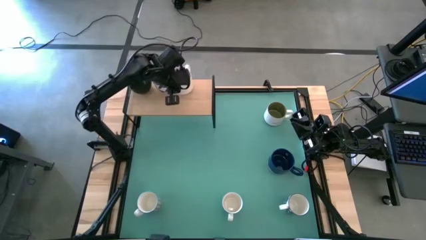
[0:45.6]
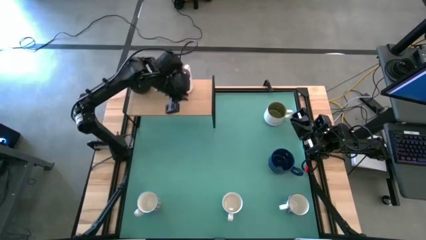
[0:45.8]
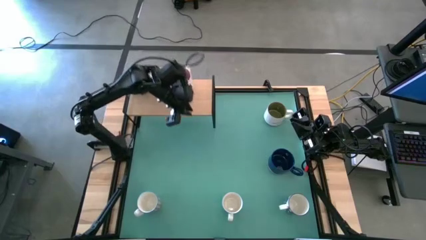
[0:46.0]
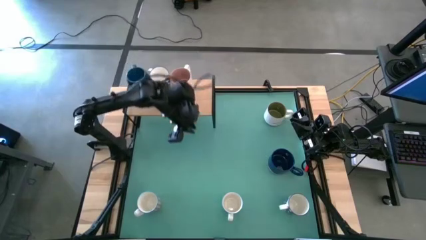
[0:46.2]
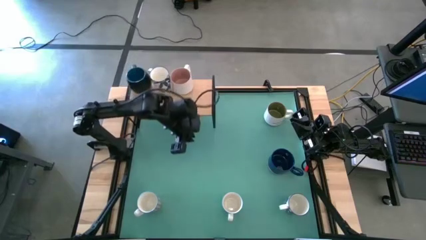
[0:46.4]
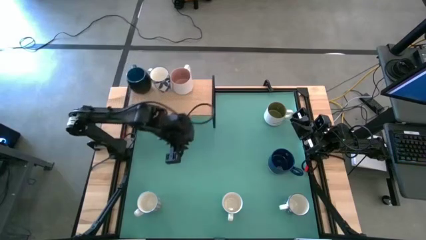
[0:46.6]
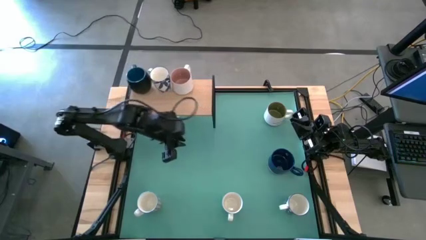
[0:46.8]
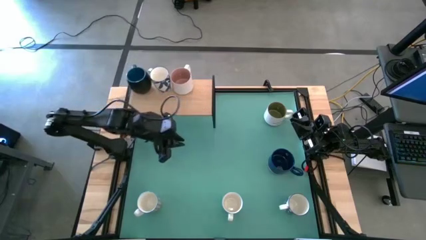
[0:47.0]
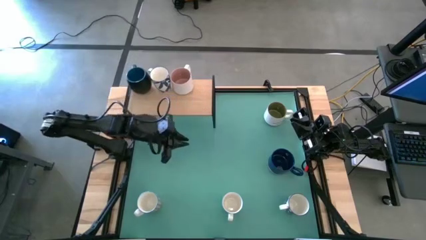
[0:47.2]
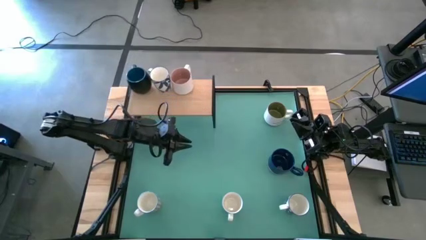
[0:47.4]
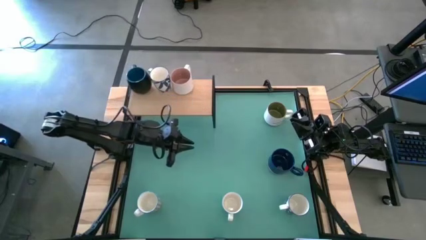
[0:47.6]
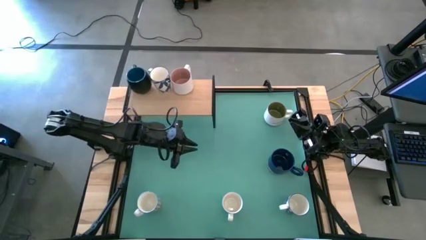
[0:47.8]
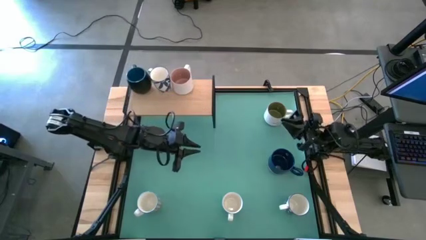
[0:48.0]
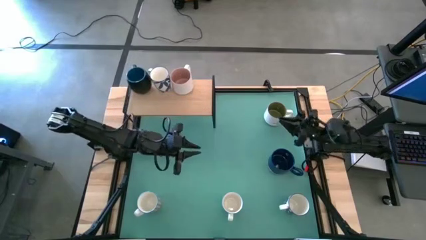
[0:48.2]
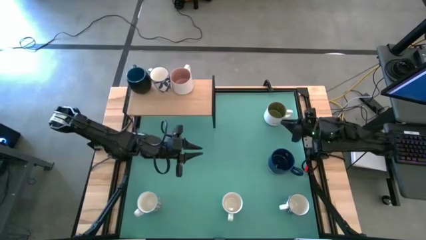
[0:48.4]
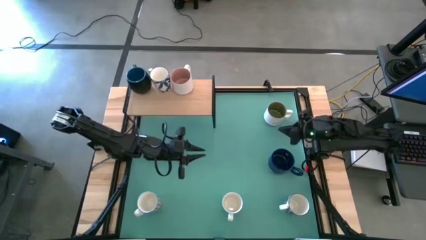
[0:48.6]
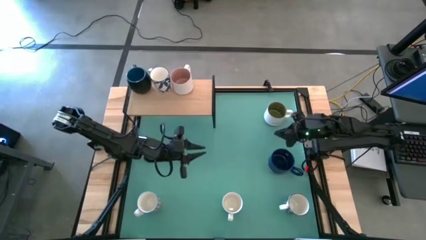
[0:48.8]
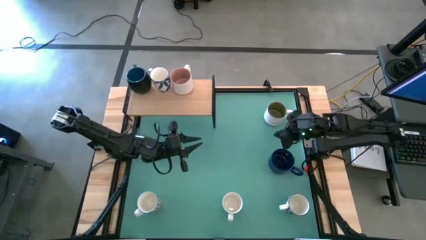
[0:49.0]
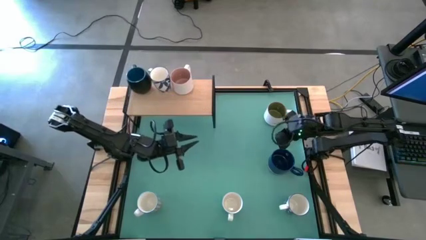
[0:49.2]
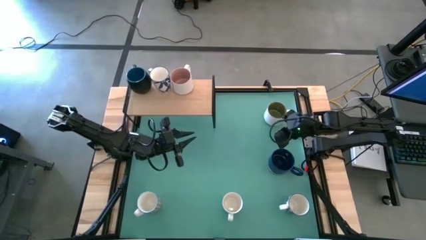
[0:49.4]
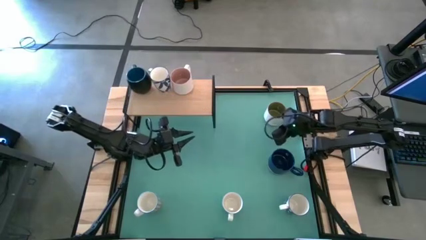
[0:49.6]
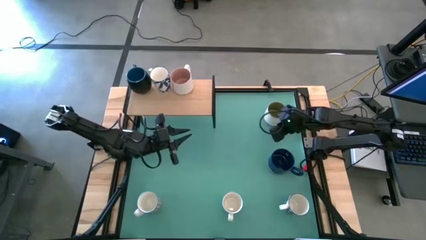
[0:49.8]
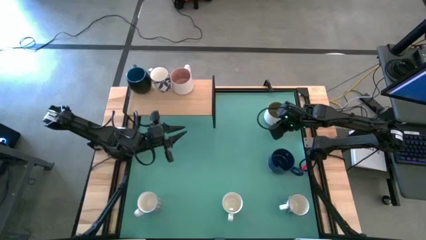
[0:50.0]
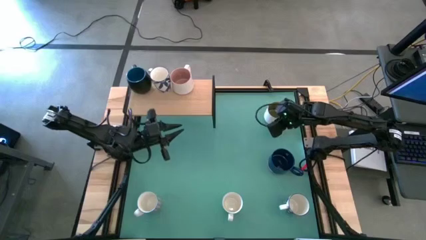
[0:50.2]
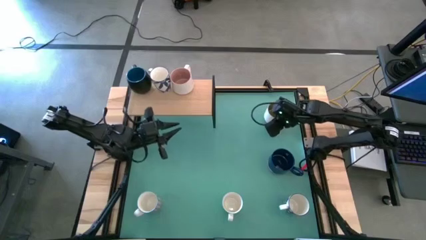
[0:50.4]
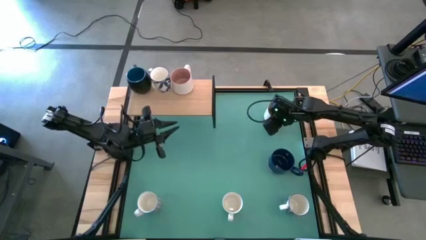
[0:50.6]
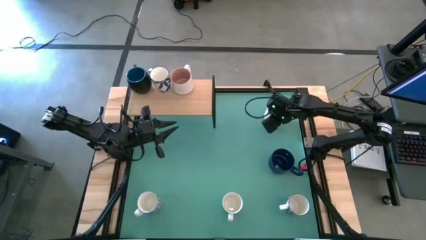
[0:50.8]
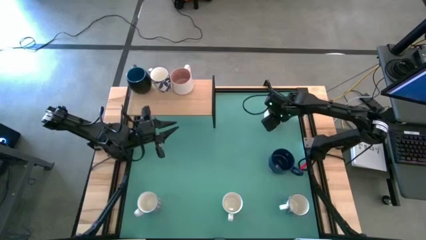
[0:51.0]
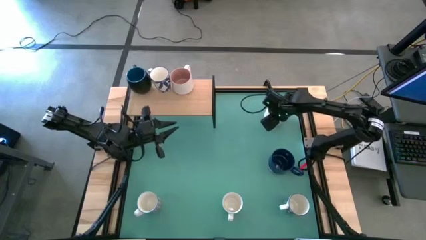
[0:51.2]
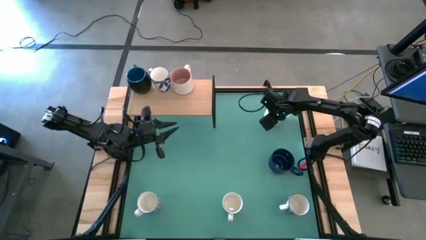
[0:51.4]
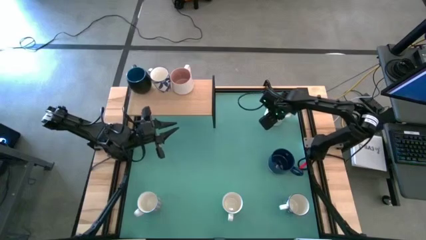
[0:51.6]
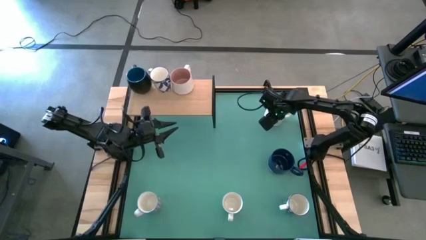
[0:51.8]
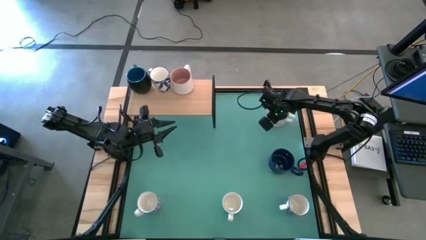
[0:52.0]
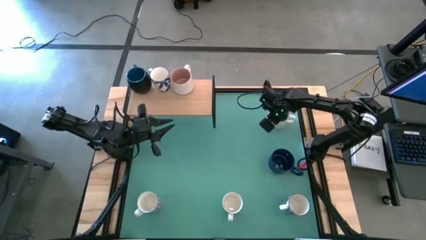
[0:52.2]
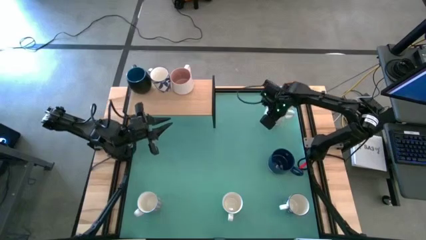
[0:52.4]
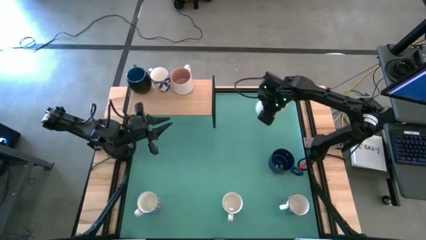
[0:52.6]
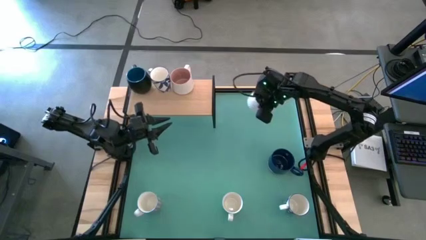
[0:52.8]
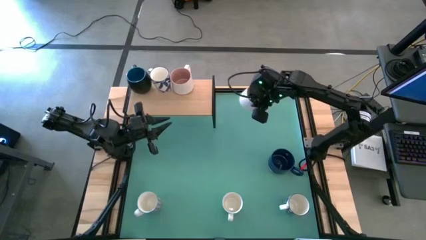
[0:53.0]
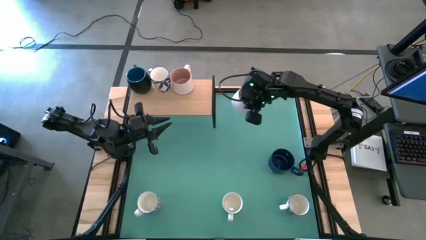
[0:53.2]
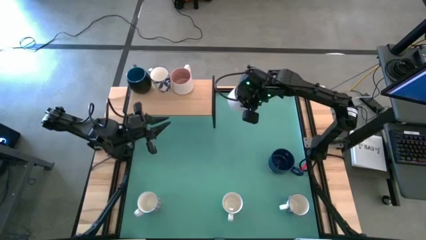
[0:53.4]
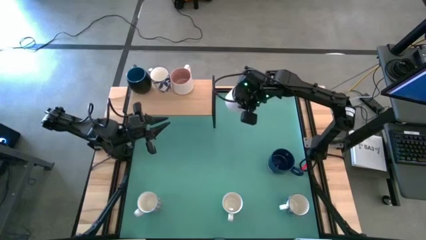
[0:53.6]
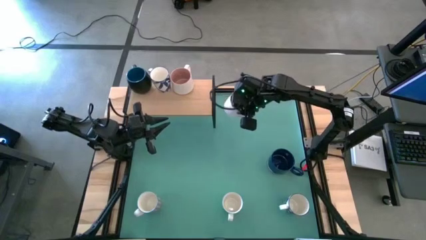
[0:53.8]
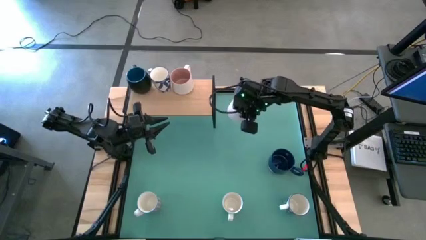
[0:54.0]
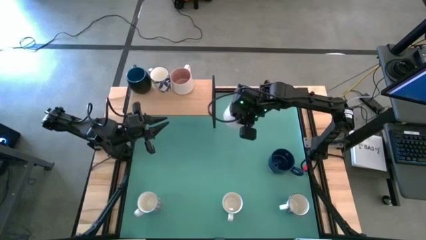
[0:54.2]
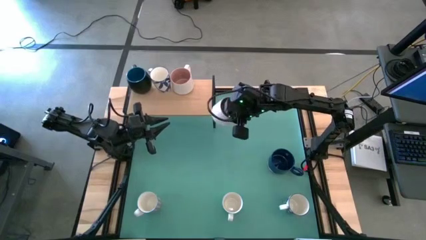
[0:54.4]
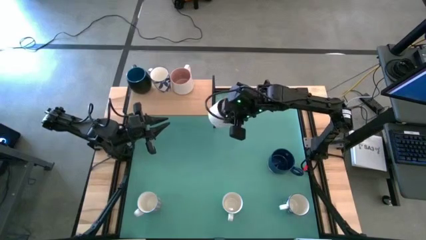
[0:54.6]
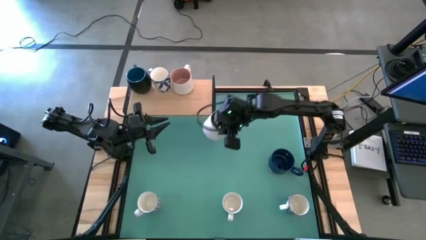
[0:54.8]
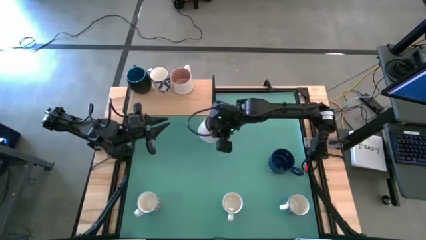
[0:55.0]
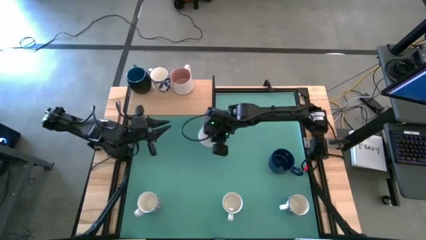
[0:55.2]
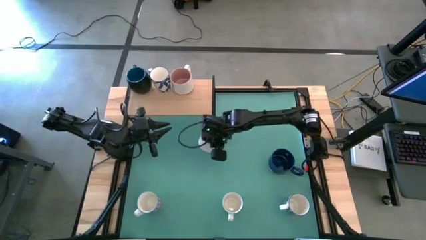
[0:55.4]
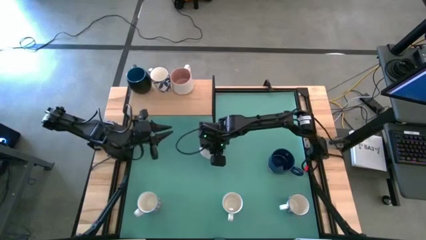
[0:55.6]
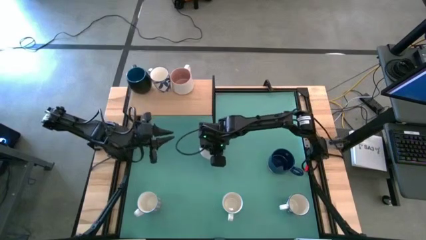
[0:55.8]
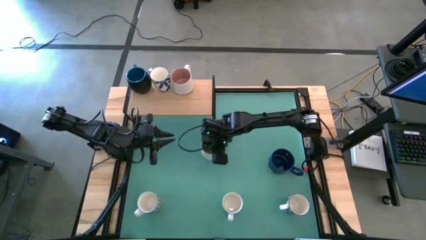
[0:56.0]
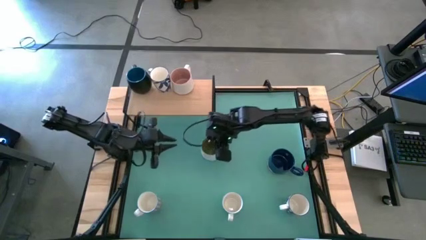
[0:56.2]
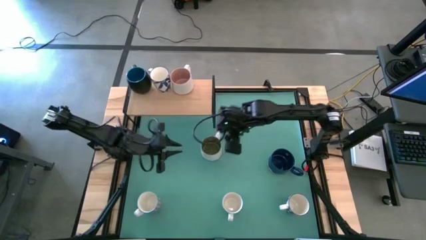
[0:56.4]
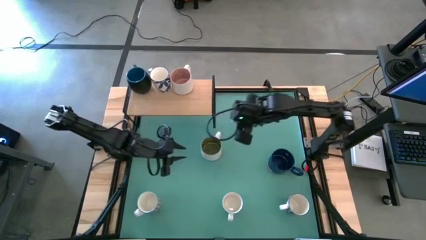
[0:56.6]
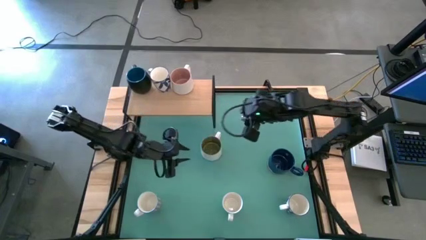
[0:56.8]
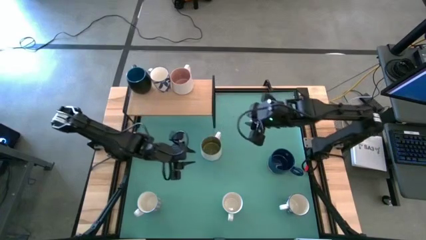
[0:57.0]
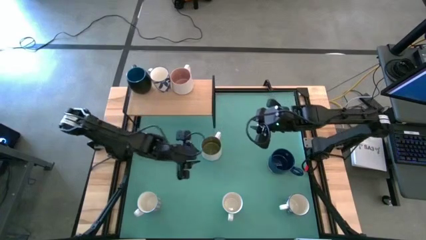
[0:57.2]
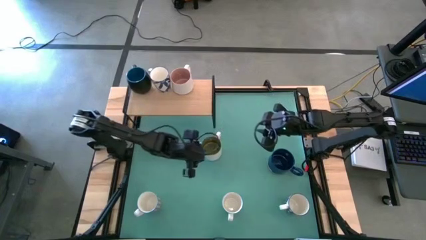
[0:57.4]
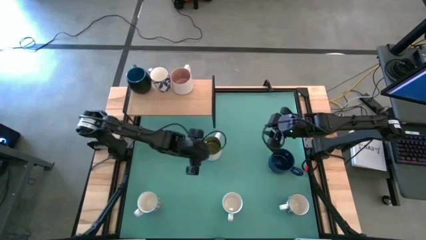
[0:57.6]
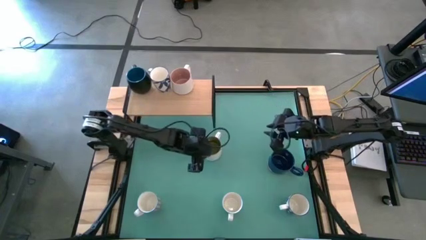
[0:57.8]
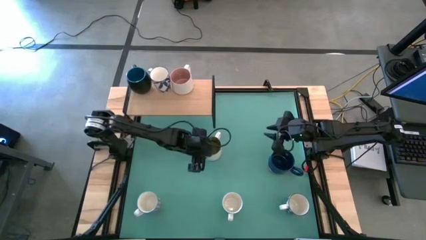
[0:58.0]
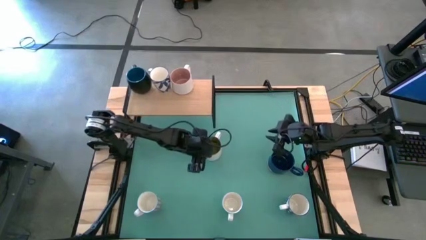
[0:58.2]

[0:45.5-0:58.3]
Task: Place coffee mugs
Put the white green mug on the shelf
